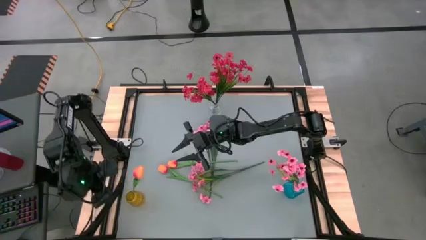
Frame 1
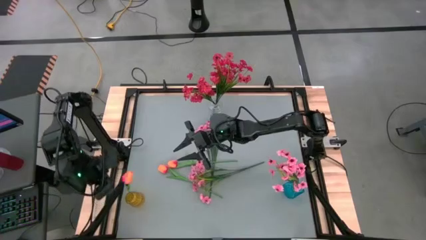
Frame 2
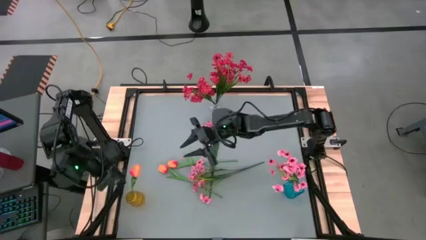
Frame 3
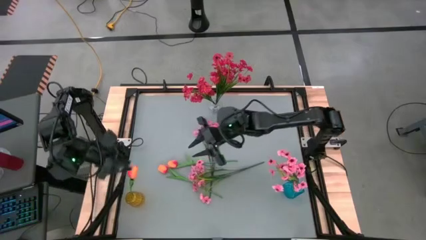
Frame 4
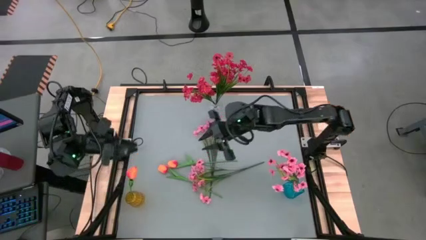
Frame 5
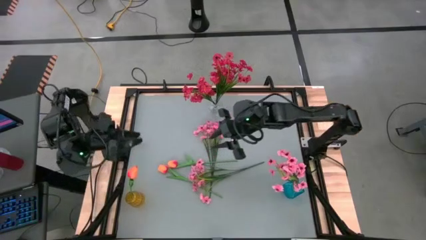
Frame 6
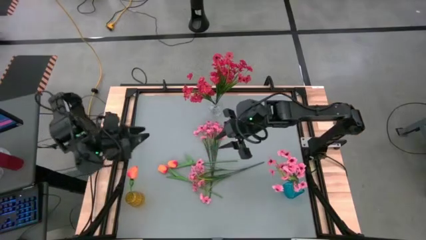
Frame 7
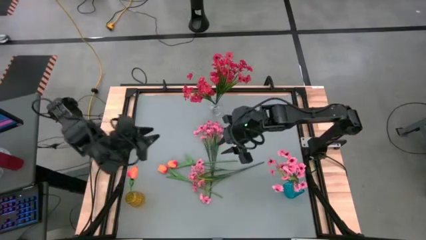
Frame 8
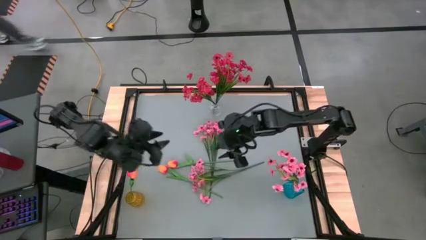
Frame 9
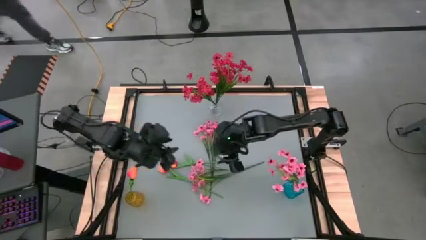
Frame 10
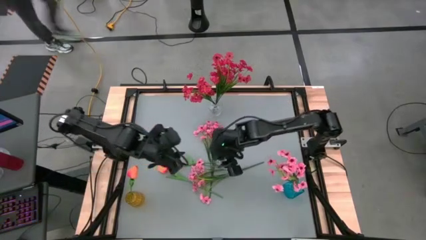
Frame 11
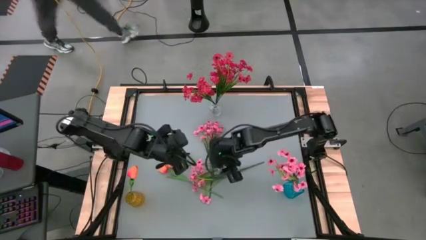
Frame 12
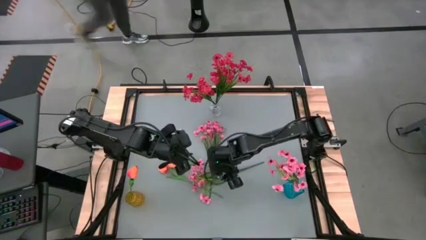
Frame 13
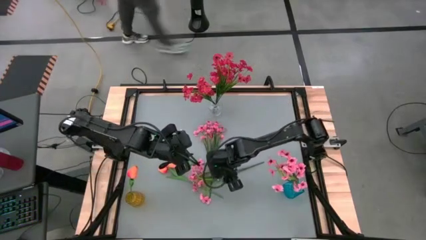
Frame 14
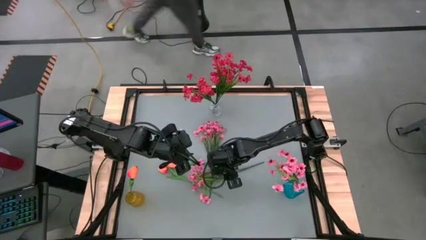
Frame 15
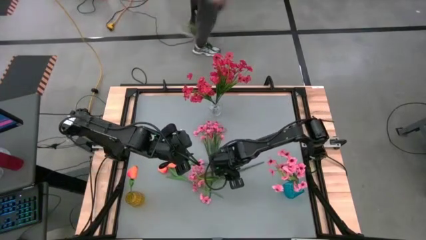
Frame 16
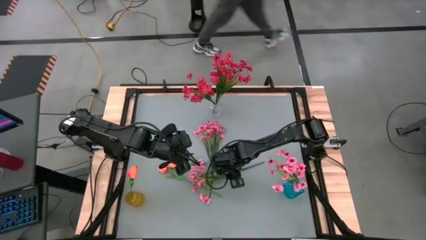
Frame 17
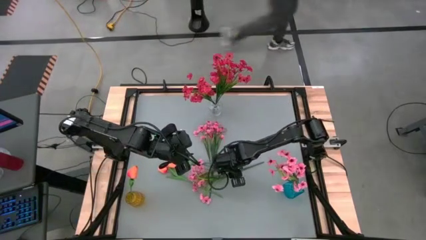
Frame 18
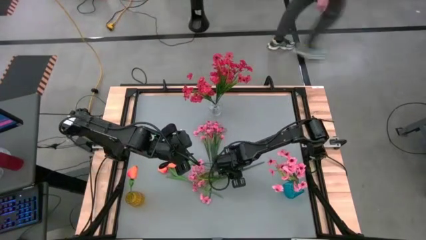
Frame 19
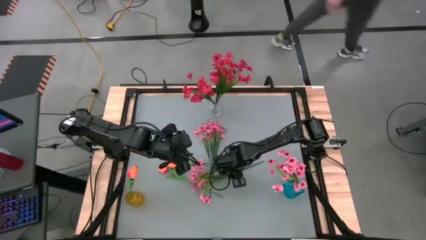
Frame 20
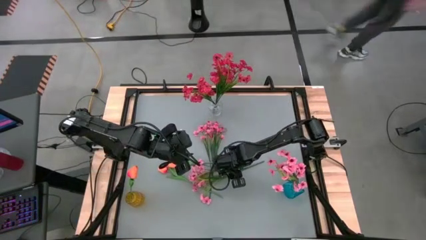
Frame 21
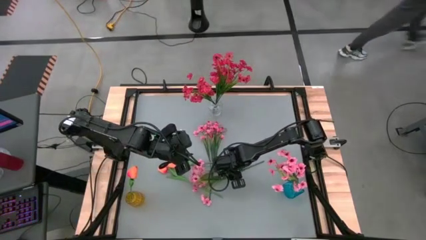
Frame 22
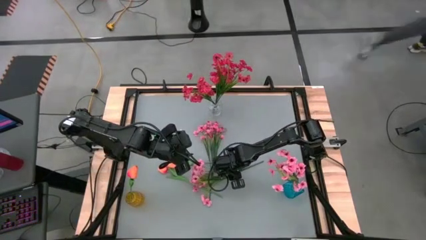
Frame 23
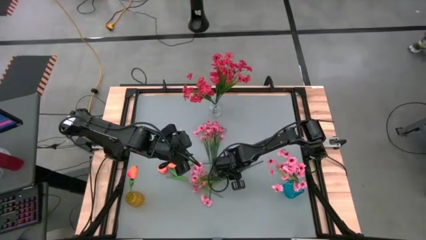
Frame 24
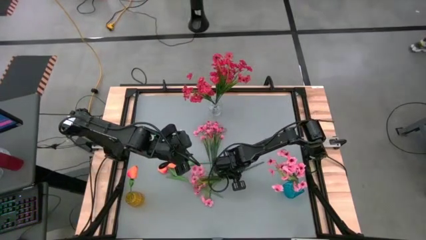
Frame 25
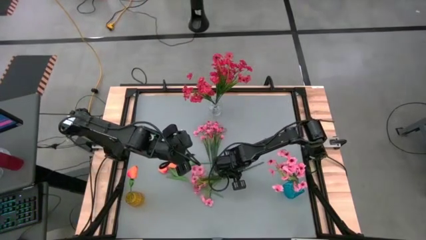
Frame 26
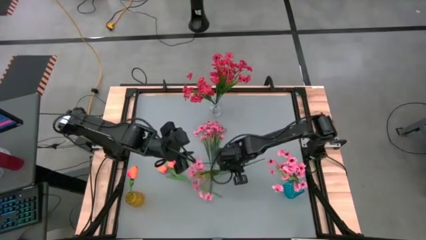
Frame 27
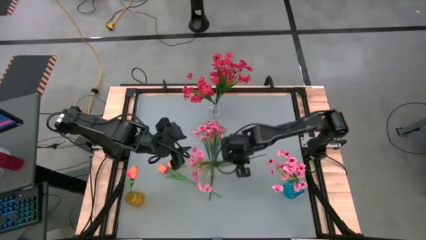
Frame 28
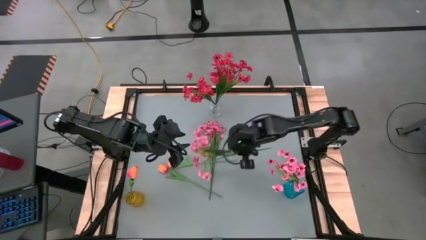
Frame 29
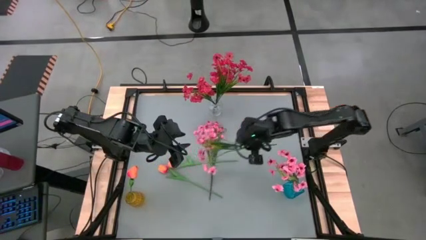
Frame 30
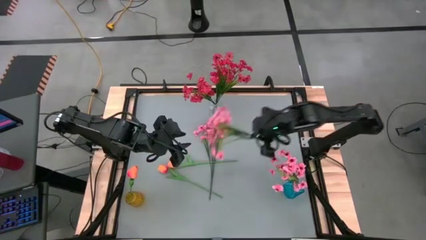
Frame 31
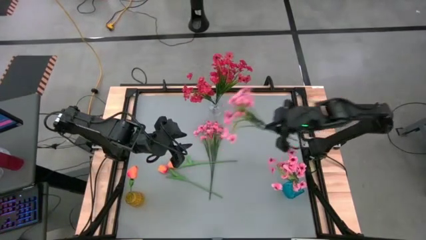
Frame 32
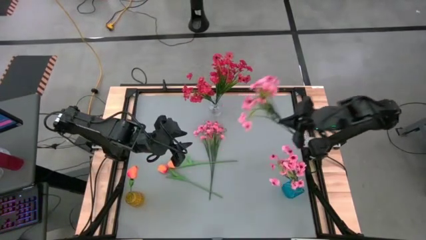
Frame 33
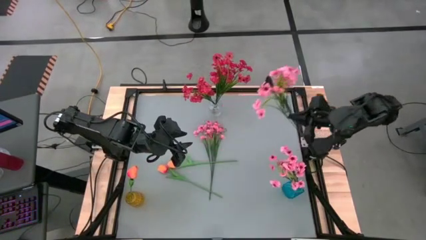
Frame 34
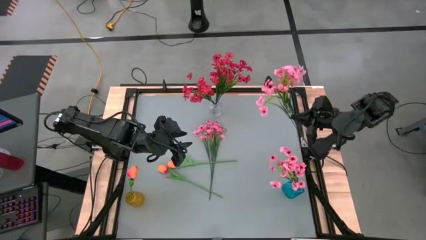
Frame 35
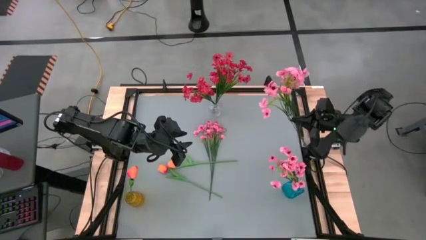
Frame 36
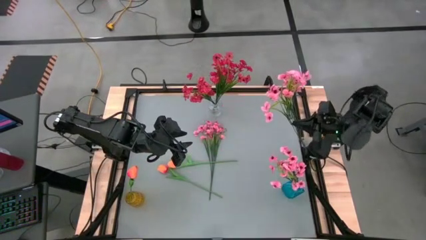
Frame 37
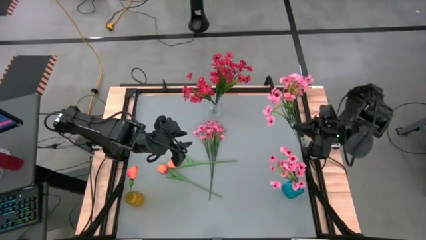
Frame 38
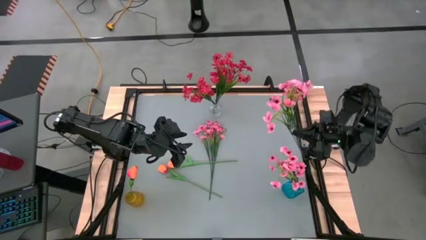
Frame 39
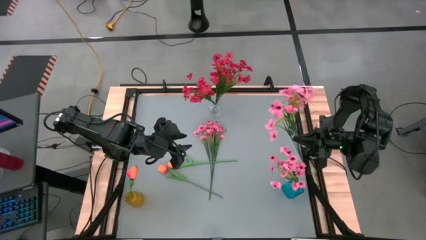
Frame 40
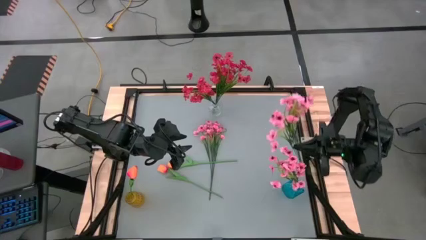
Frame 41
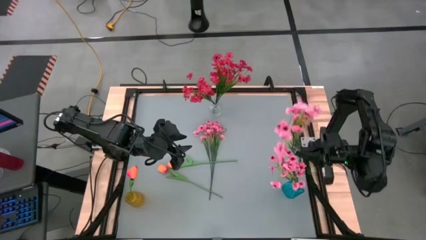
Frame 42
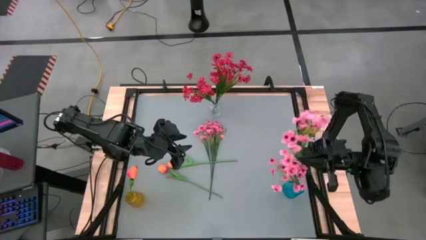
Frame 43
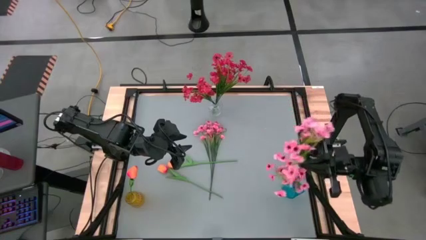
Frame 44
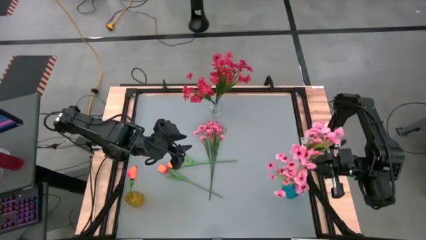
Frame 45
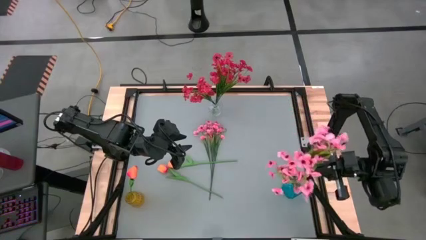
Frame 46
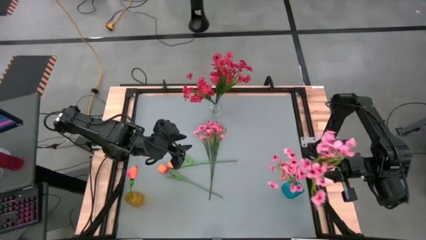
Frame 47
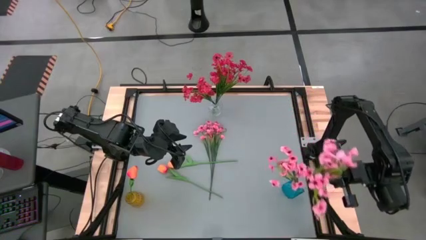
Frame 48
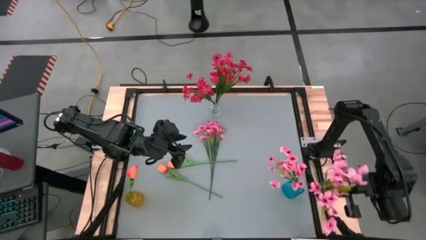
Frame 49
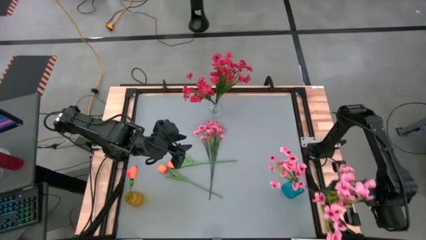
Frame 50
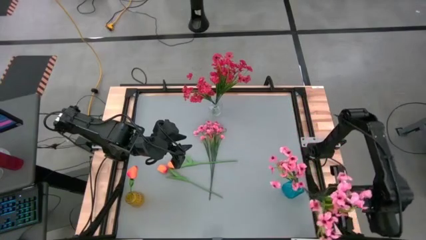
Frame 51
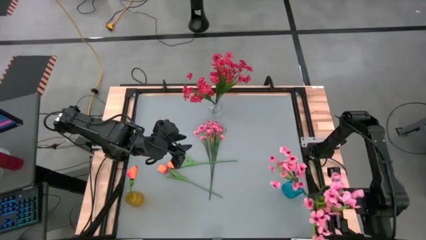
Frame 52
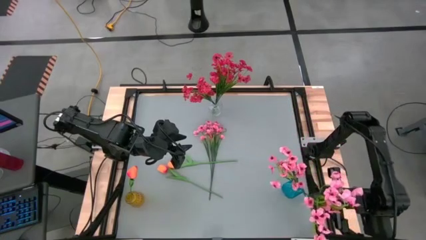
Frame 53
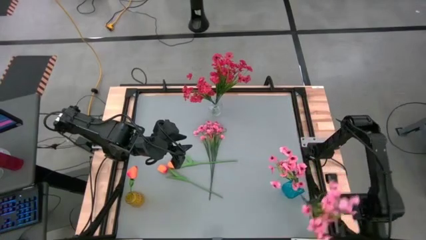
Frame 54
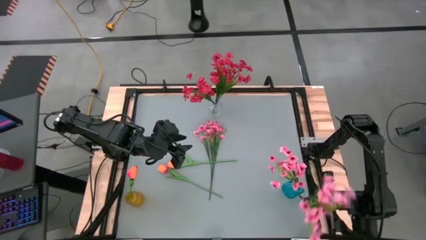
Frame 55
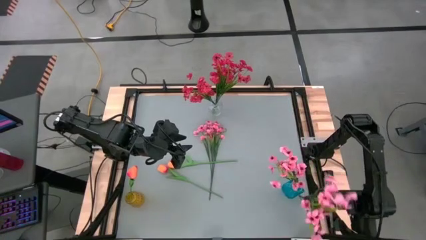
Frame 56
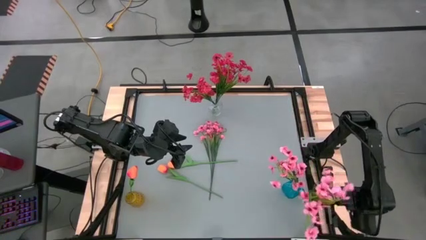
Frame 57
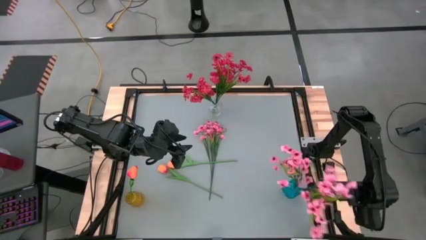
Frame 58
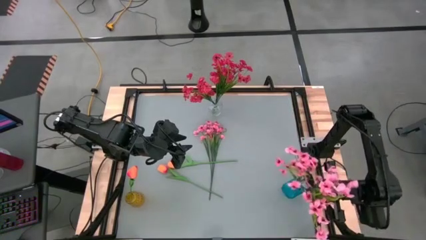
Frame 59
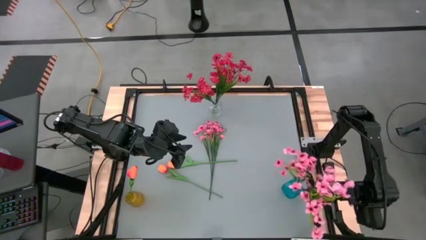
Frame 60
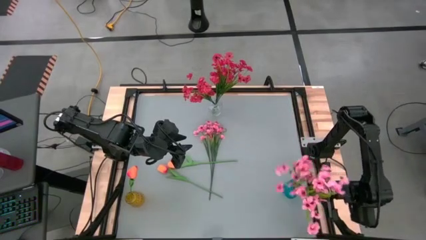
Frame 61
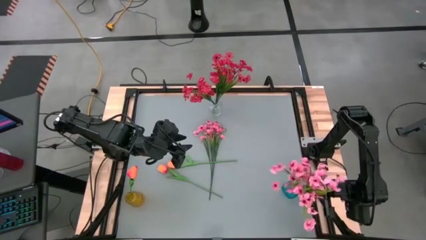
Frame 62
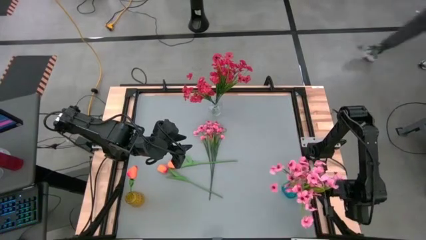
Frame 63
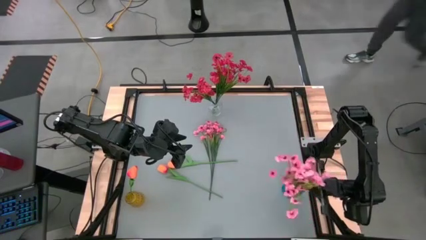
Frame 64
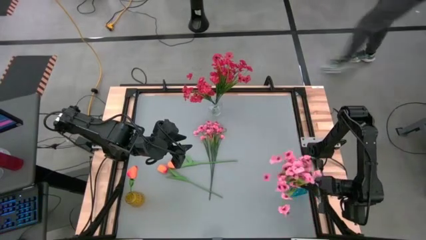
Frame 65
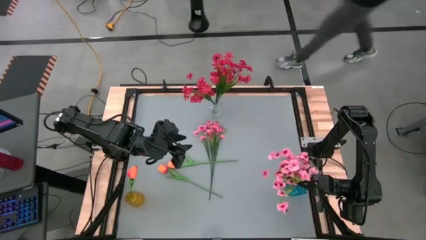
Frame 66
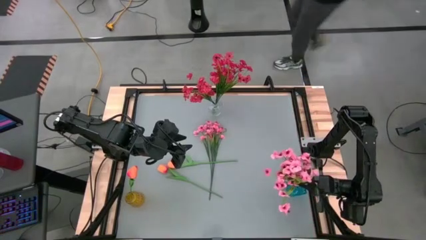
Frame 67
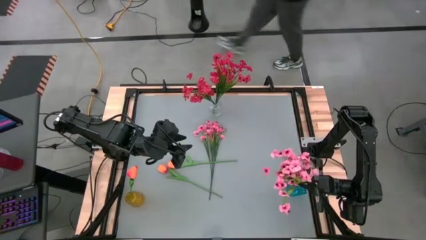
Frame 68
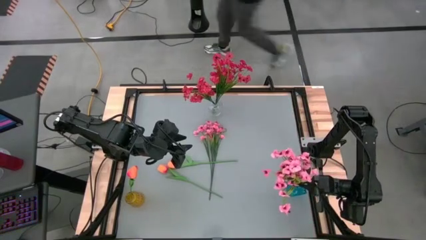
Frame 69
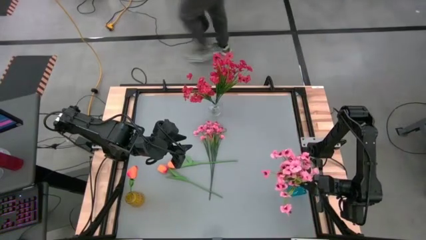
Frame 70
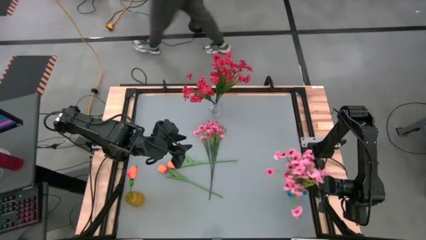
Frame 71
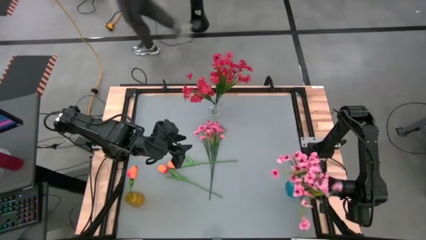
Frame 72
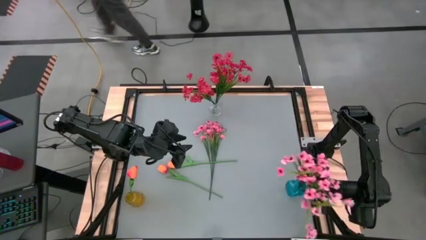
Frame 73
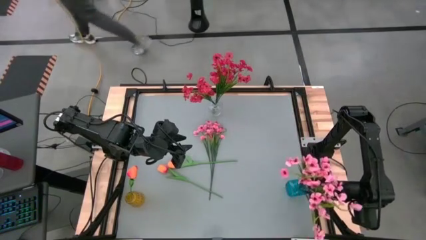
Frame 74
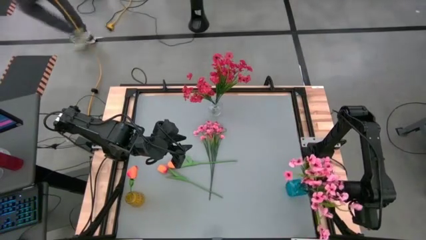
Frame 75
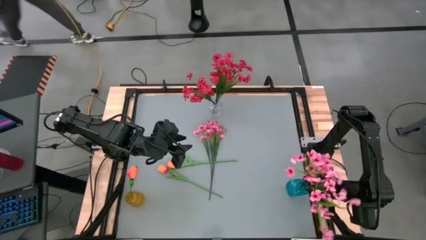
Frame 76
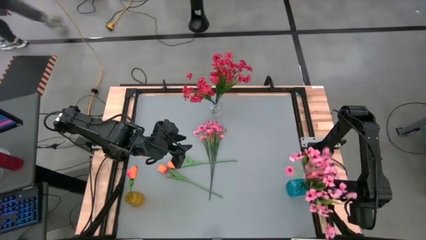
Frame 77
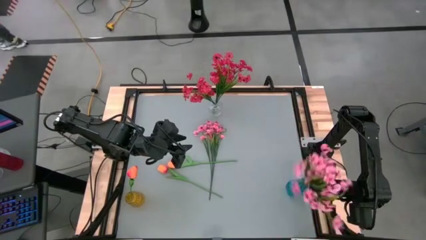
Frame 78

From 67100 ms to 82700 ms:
Task: Sort flowers into vase by color
Put the bottom pink flowers into the blue vase
